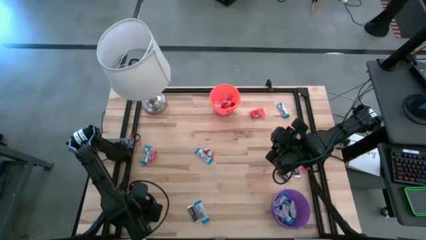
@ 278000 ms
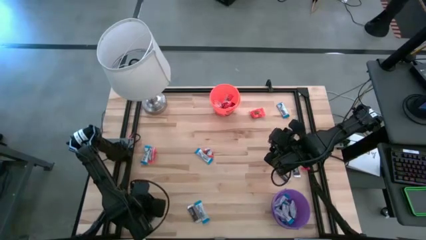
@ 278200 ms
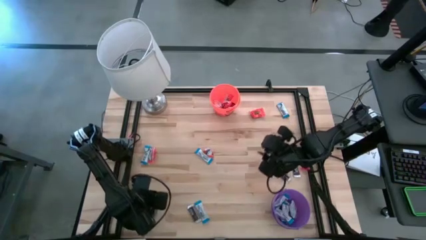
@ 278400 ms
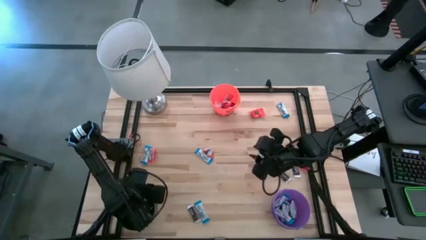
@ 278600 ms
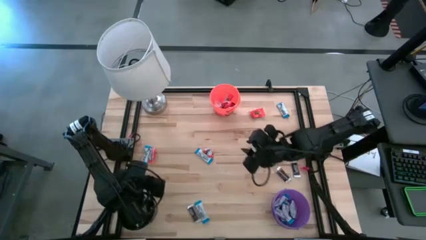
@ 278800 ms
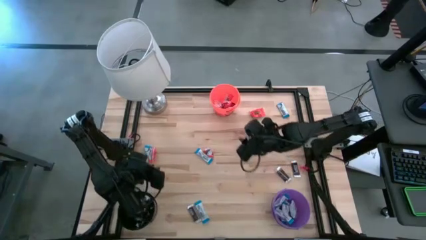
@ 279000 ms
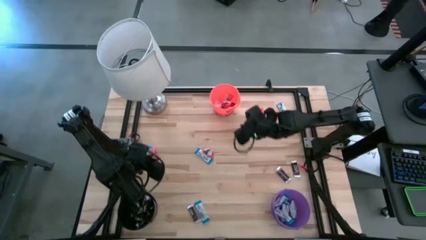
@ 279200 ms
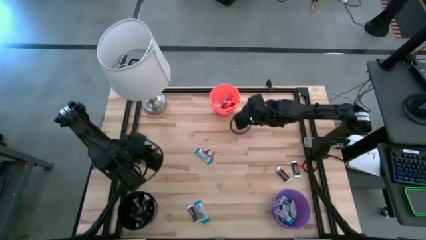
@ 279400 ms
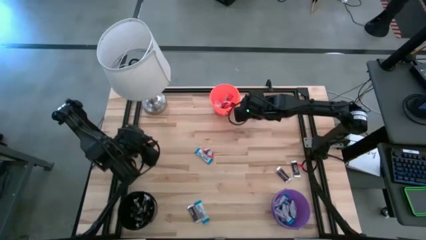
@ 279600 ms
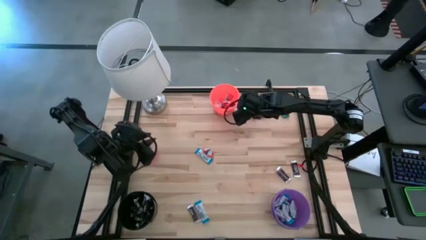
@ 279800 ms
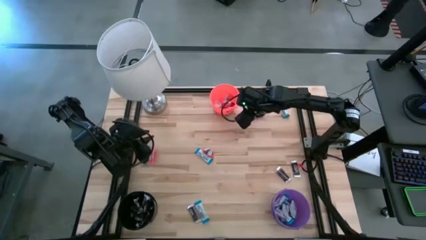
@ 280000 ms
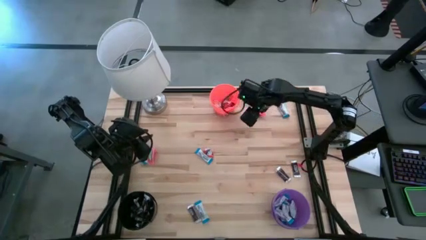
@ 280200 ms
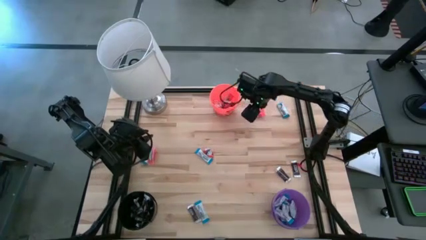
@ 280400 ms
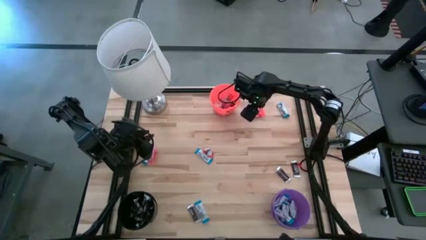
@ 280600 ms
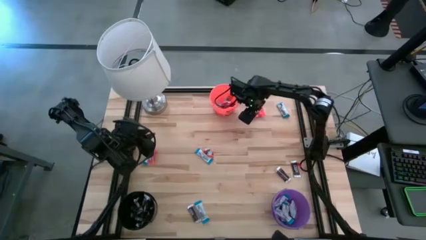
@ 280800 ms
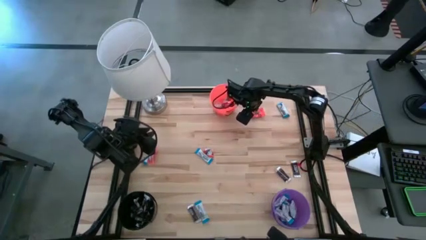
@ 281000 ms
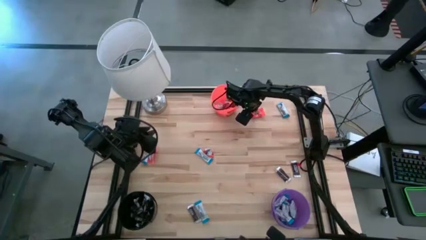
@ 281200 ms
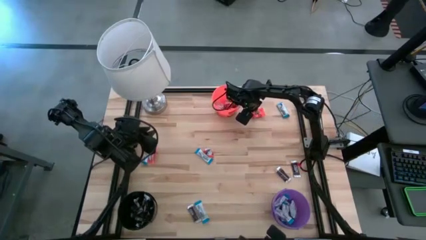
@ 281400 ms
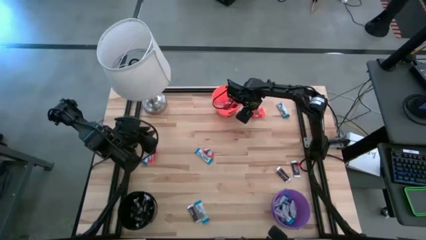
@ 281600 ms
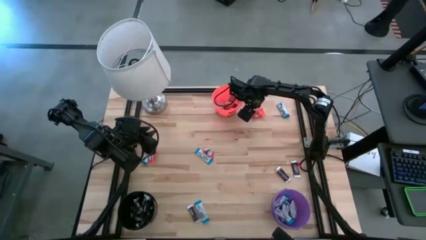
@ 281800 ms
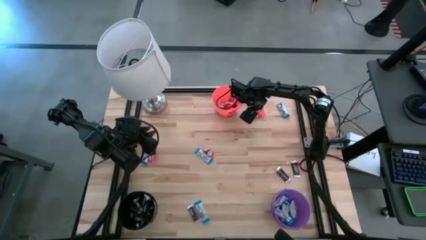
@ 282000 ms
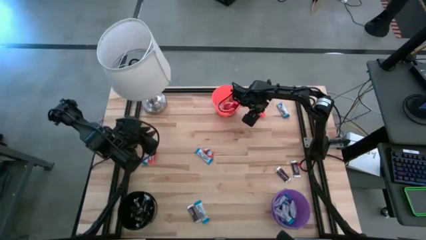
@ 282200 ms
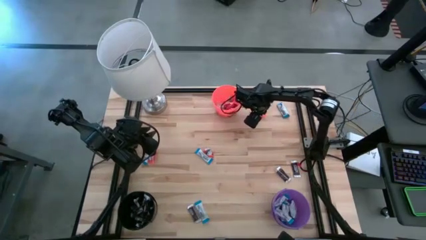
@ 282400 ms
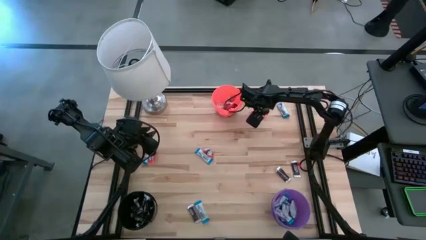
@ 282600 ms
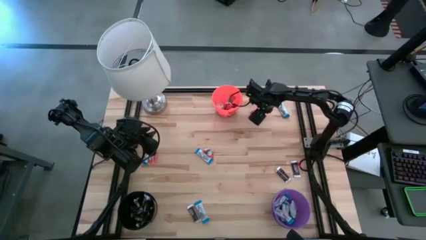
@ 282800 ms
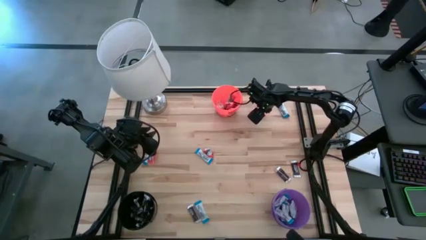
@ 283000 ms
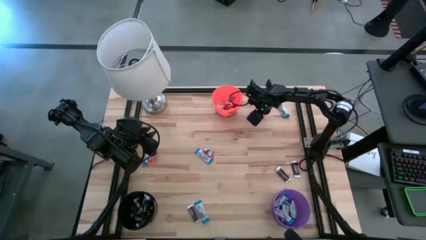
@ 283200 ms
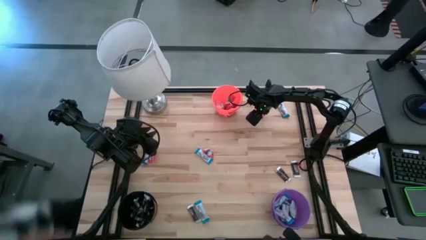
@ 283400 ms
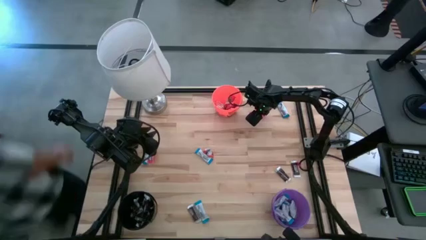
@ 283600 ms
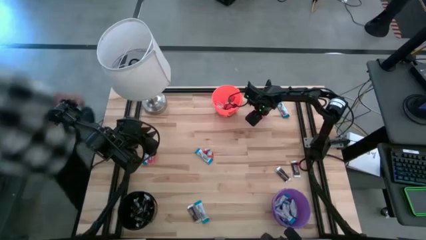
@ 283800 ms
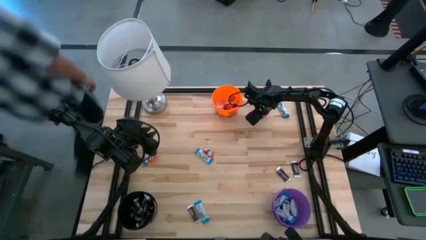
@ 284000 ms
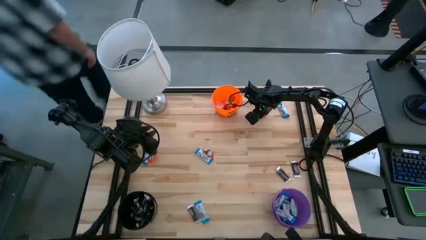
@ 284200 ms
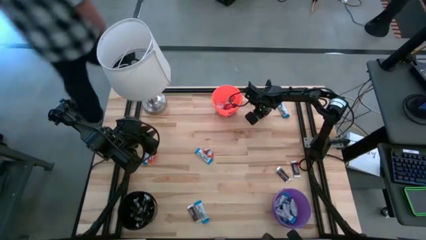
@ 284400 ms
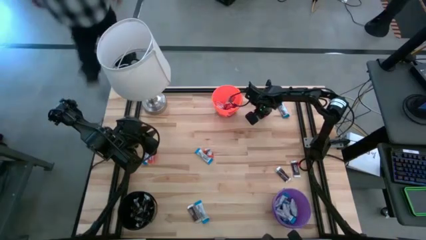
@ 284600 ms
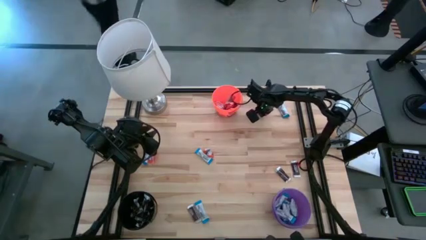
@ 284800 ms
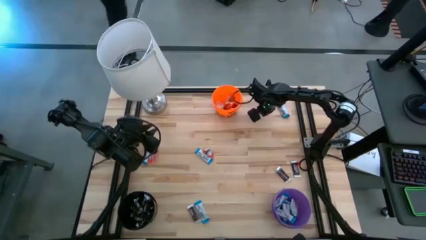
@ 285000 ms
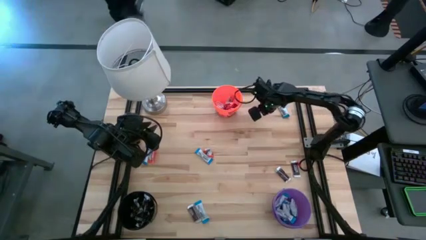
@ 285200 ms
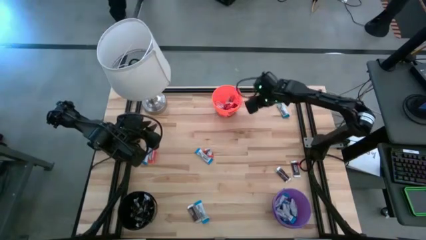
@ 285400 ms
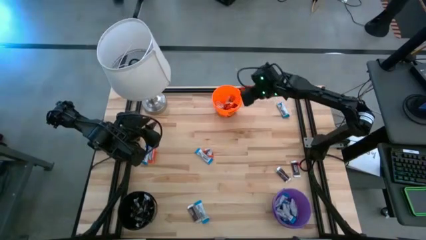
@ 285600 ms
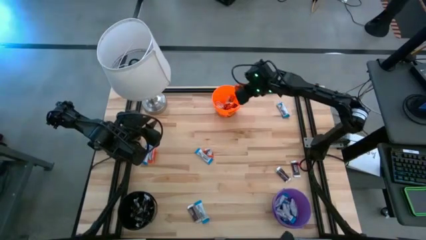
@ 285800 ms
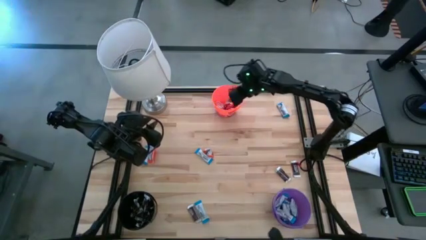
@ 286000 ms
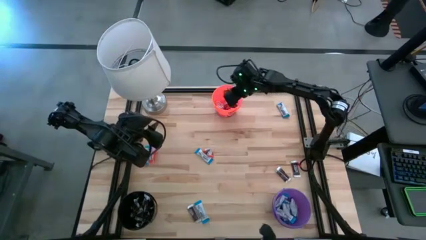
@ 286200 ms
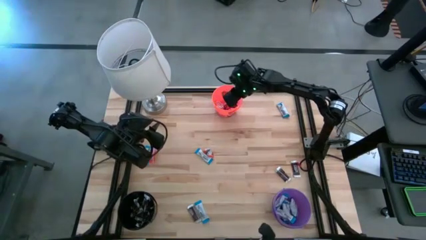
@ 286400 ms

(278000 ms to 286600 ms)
Task: Organize candy in baskets
Put the orange chocolate into the orange bucket

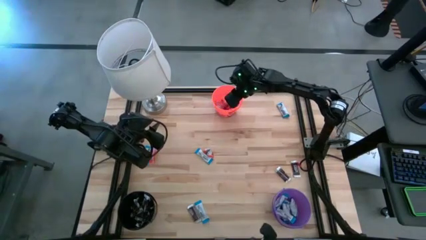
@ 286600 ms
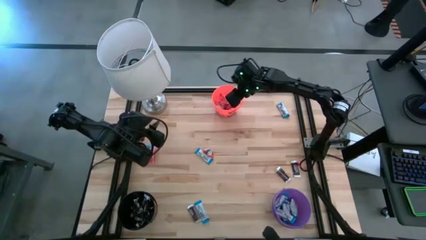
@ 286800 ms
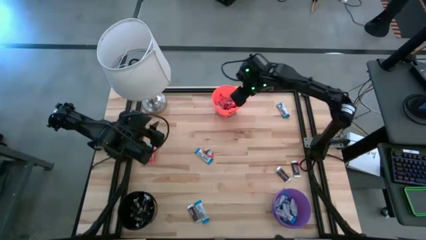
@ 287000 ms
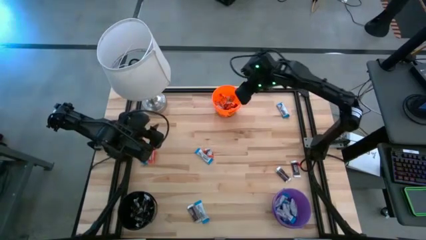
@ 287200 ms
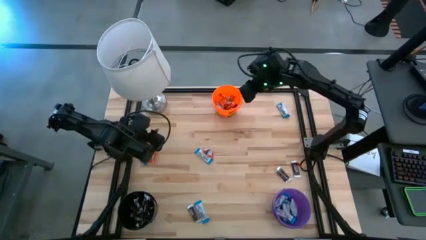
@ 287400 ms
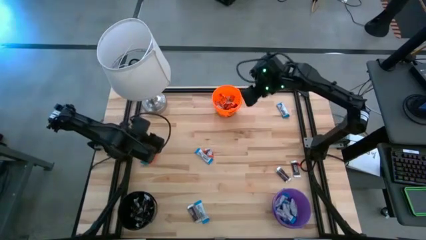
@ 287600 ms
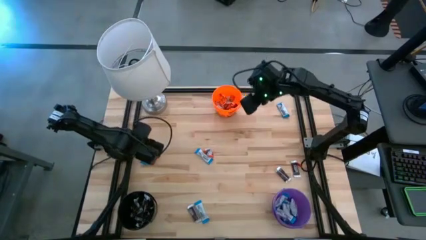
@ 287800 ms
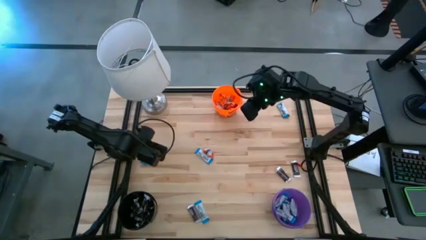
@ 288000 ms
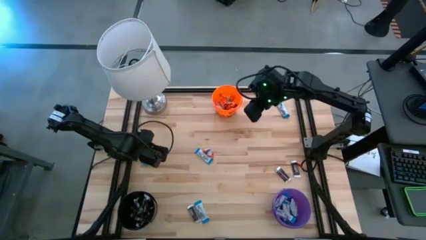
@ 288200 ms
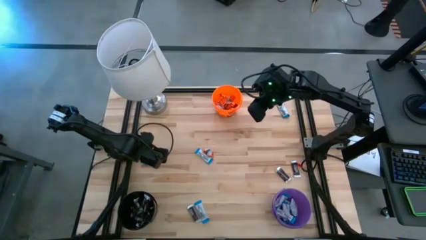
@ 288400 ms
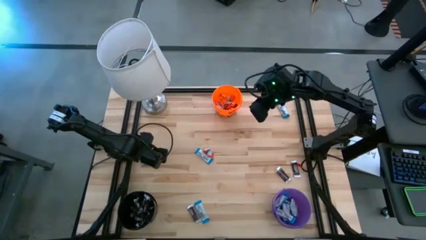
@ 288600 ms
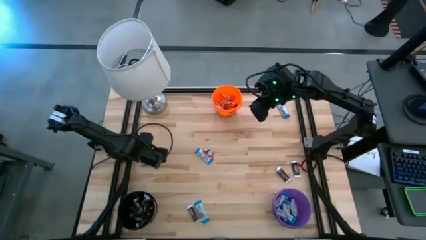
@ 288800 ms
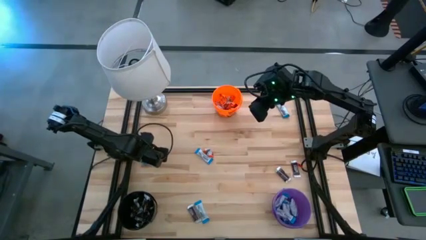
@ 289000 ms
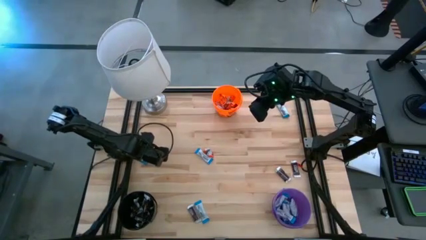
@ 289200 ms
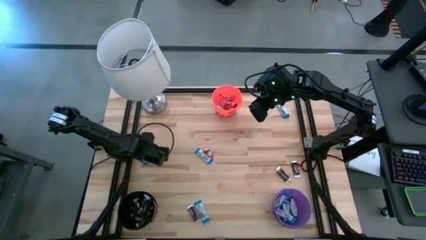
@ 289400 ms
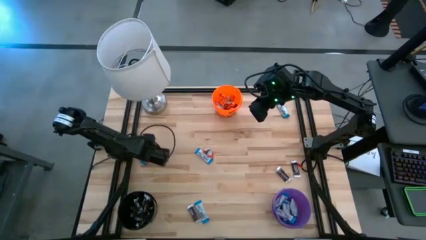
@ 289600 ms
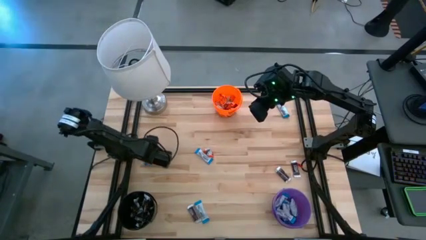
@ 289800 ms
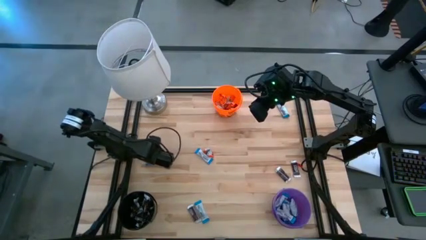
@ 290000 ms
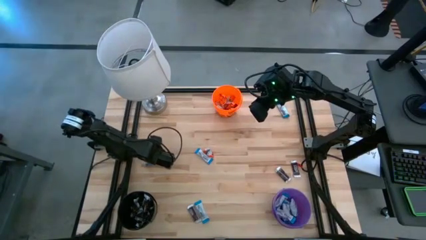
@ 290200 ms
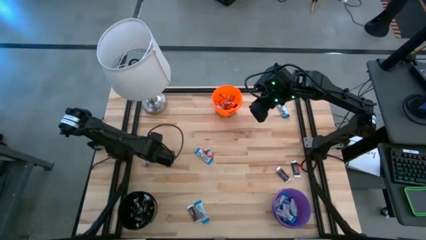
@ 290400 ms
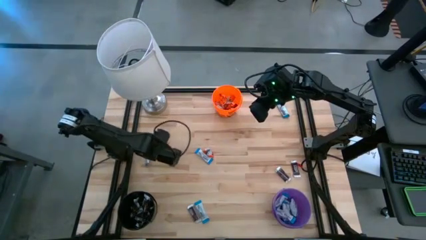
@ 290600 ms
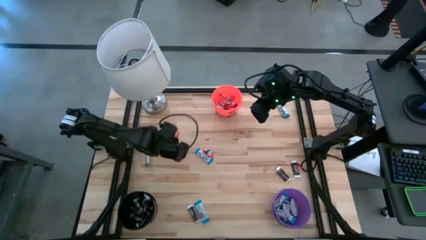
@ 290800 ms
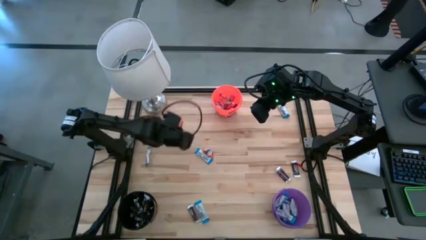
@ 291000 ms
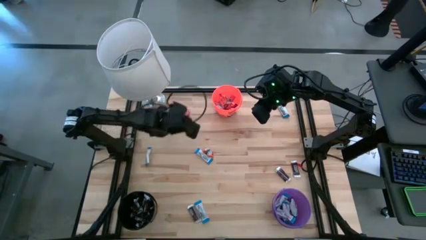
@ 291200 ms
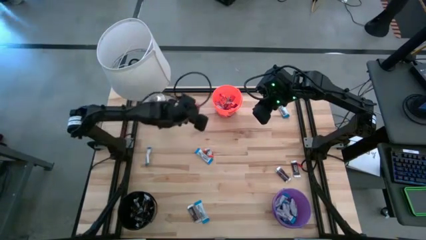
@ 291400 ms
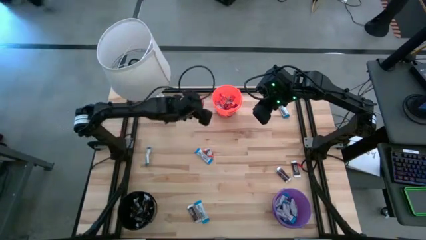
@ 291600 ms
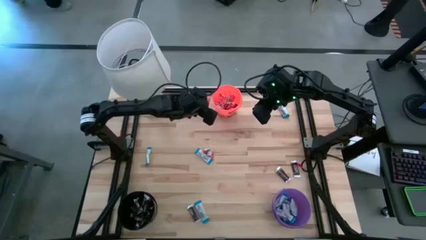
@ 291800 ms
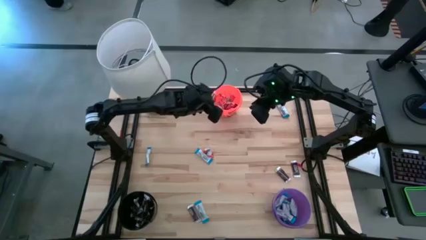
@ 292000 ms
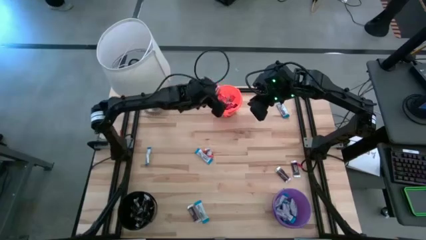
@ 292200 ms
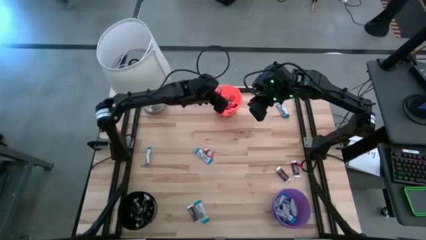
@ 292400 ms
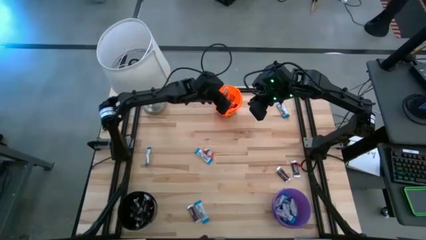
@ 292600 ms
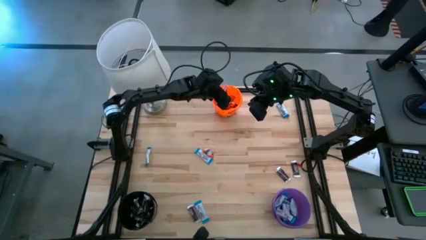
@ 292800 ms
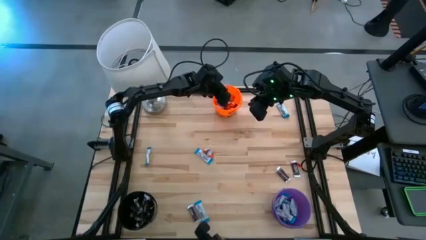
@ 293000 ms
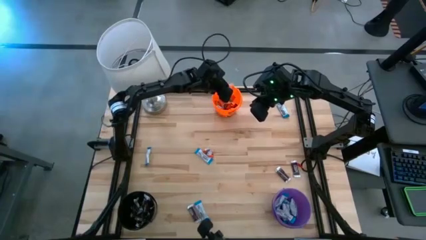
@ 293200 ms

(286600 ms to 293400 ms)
Put the orange chocolate into the orange bucket
